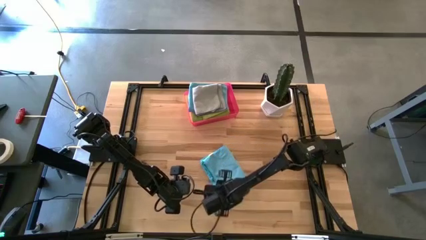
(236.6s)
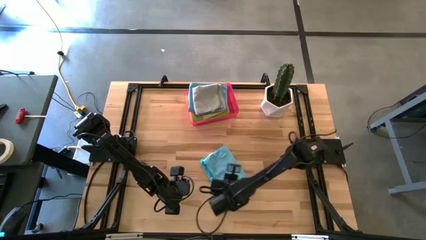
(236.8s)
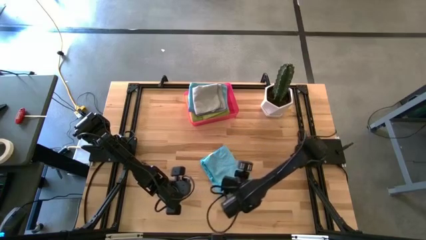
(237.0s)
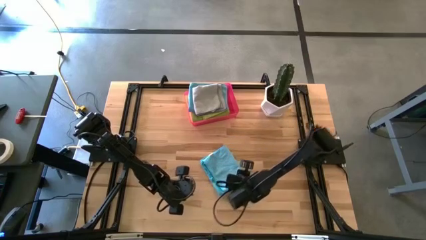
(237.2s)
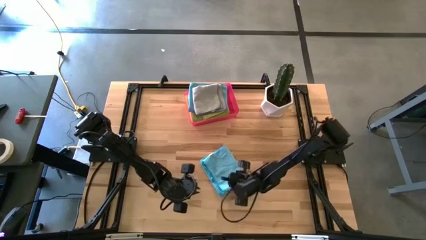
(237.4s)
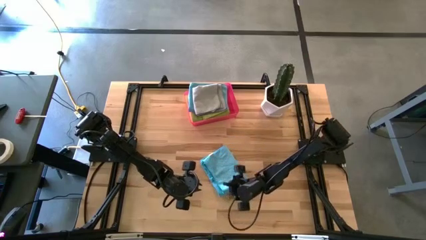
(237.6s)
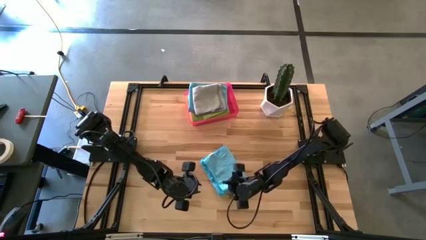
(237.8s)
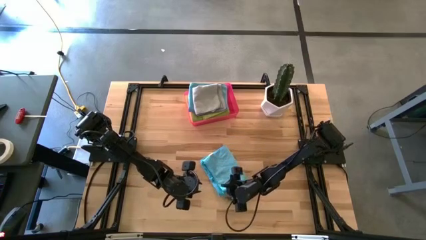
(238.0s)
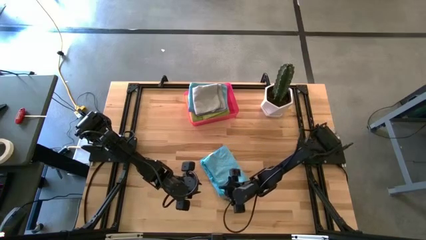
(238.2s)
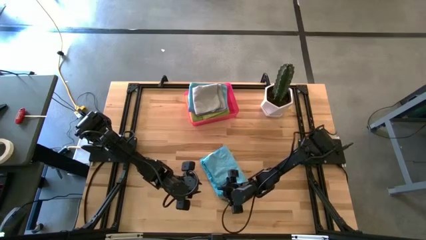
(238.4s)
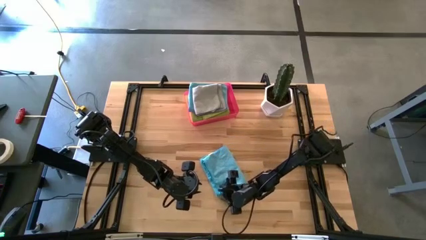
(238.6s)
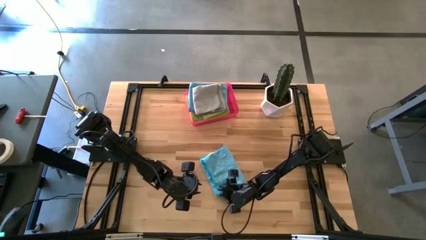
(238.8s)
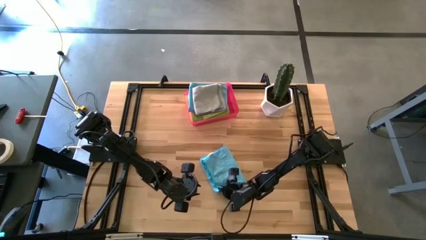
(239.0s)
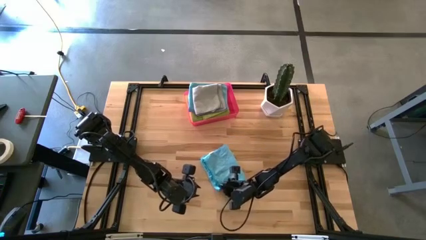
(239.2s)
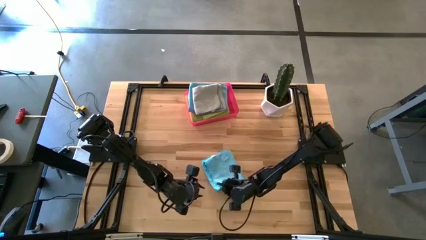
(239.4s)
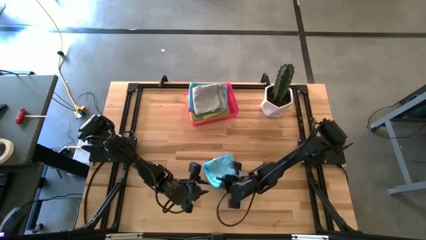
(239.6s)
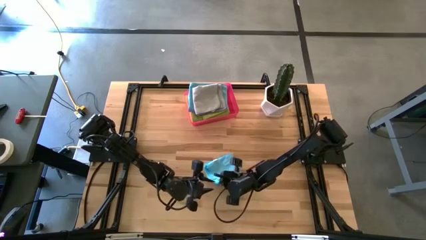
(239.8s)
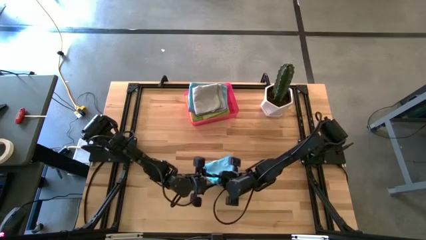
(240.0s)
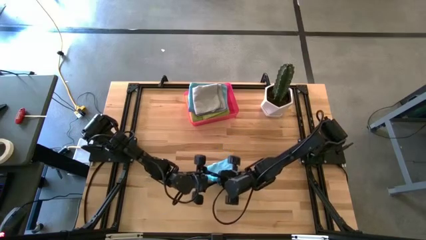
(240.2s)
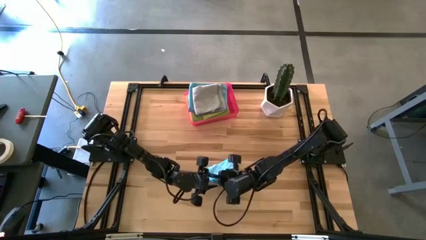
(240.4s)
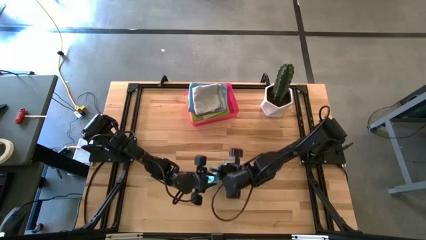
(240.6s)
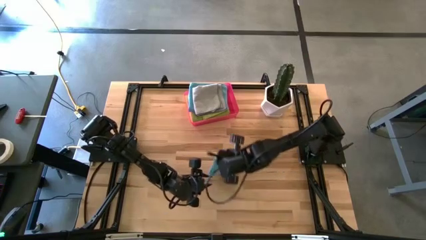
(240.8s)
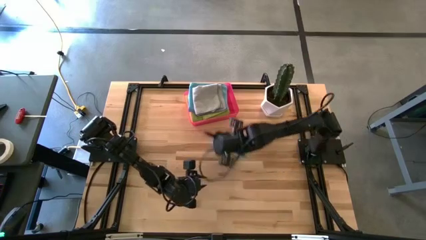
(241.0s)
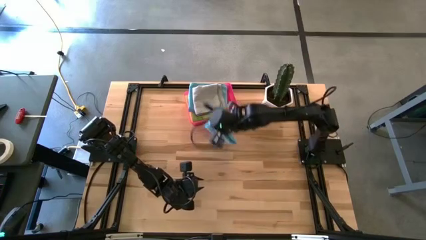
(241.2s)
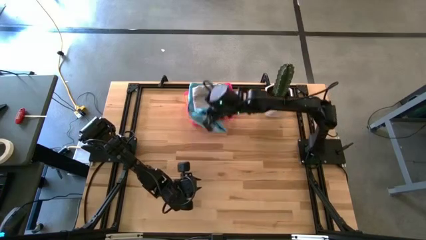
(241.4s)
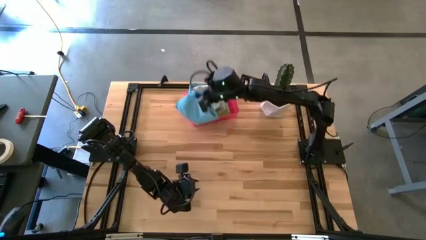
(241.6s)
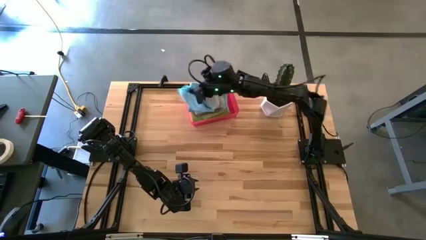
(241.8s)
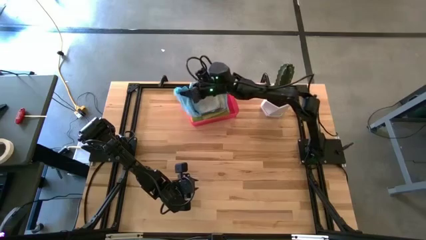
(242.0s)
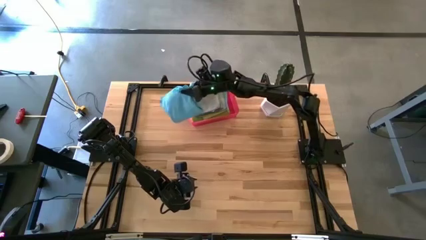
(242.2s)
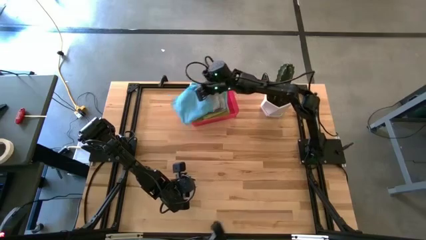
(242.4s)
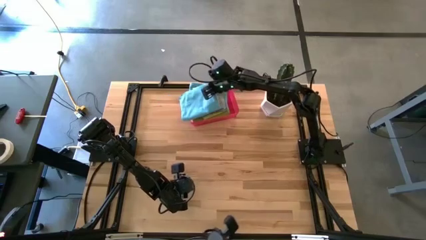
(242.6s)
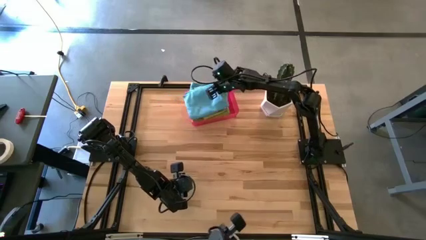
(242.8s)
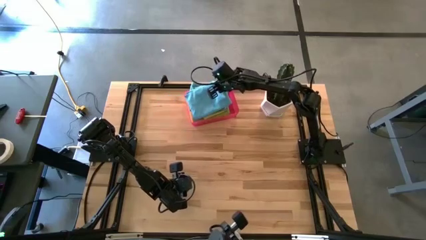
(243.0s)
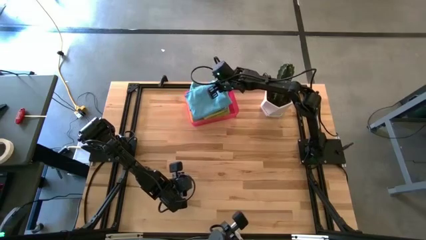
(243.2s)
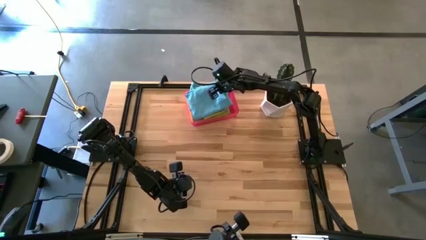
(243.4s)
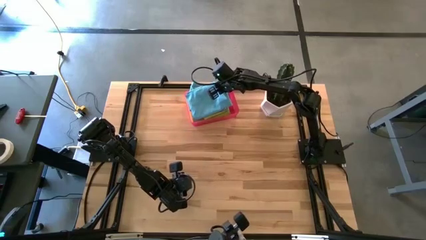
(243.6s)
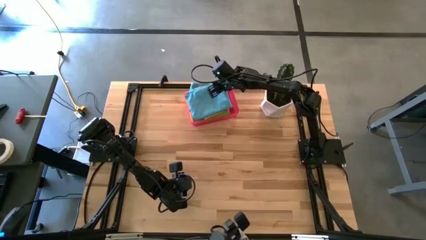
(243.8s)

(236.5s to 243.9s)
Task: Fold microfiber towels
Stack the folded blue microfiber cloth on top of the folded gray microfiber cloth

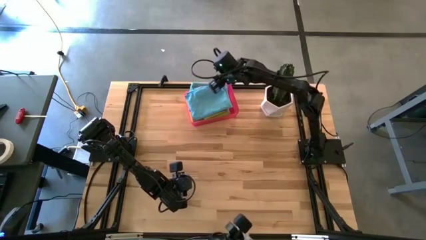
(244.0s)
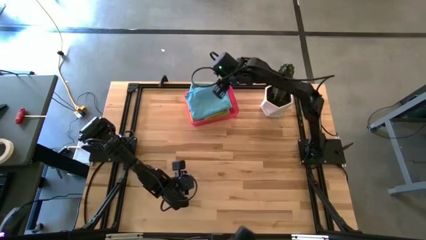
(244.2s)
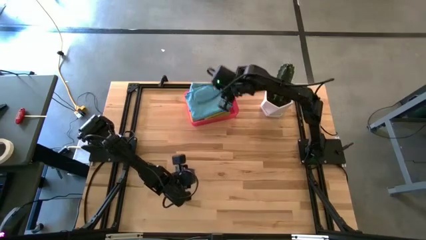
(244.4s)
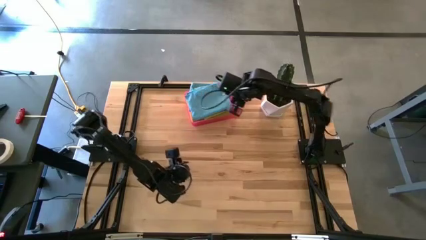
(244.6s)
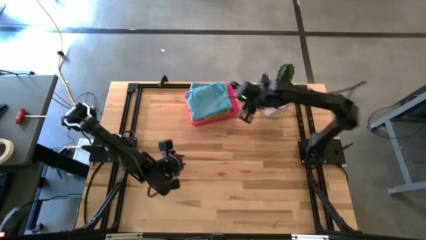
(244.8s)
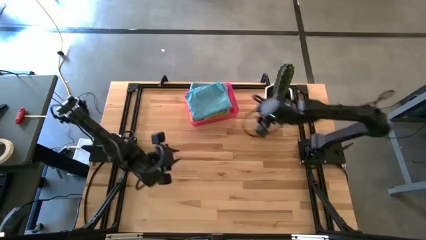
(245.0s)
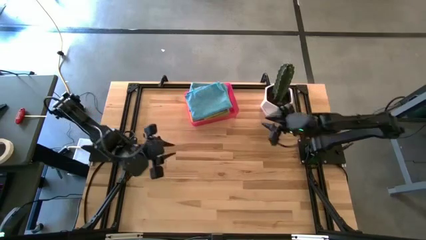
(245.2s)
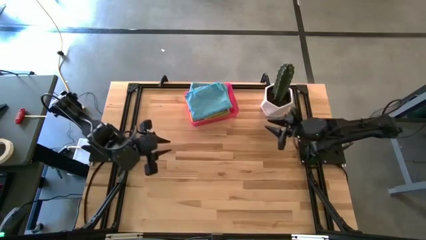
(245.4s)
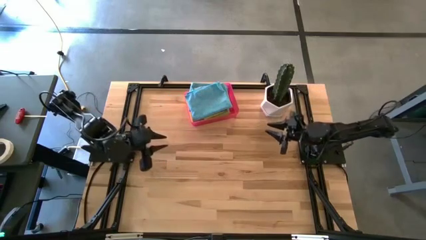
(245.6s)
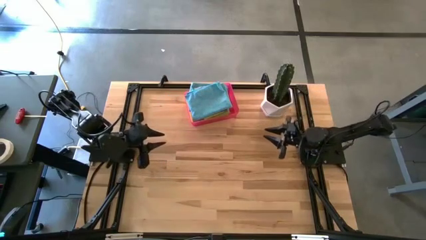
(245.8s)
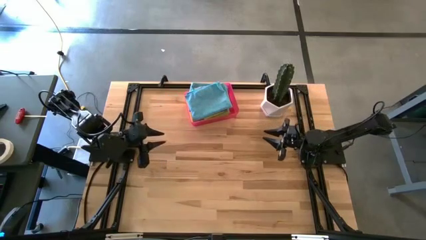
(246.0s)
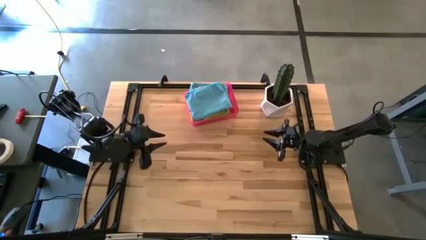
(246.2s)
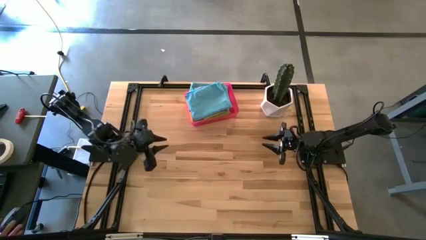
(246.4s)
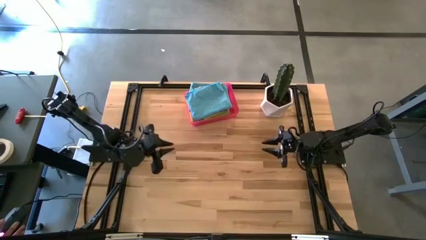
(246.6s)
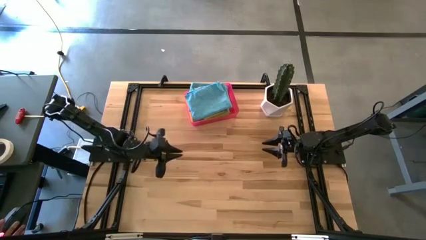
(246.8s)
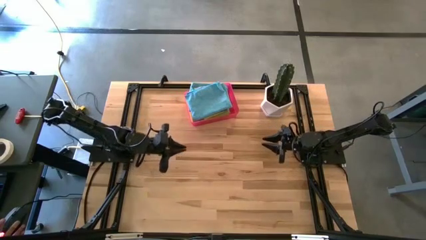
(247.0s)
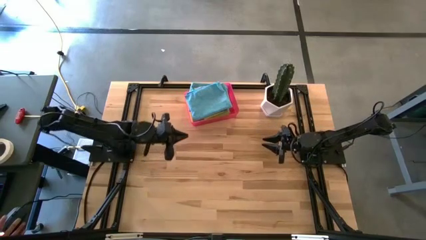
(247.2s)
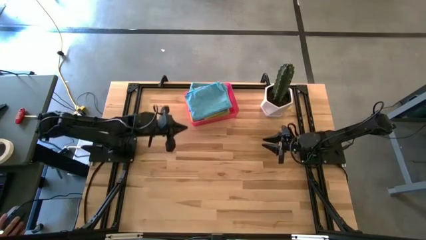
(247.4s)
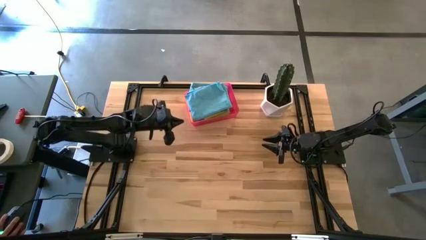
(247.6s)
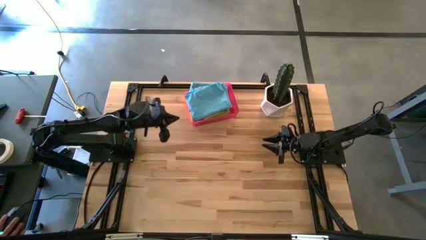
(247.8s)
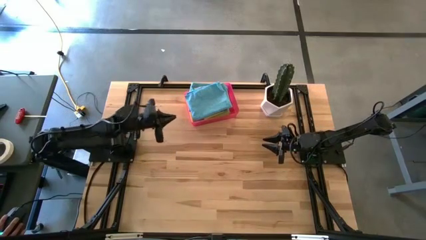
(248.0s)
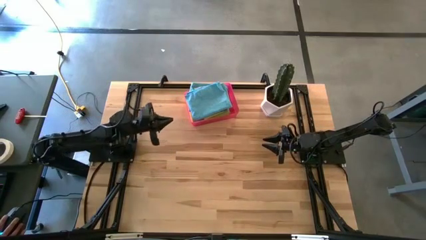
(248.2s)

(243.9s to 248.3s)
Return to Home Position

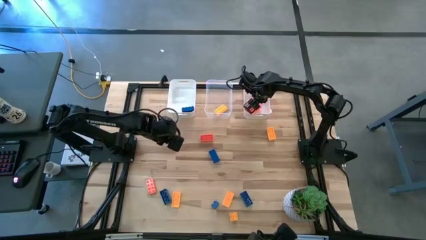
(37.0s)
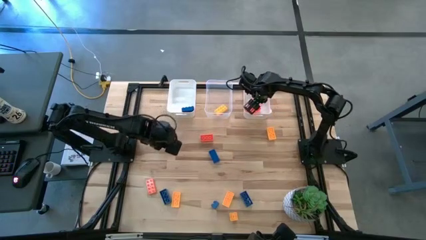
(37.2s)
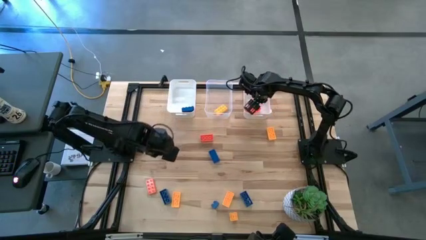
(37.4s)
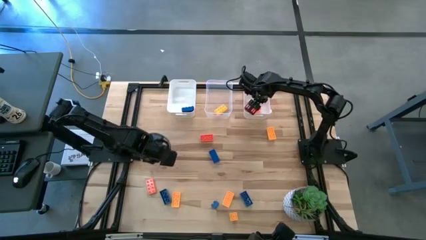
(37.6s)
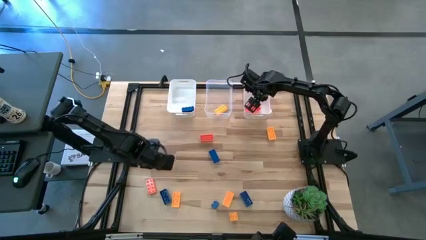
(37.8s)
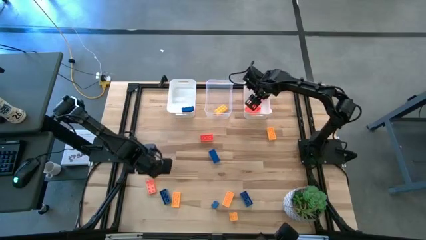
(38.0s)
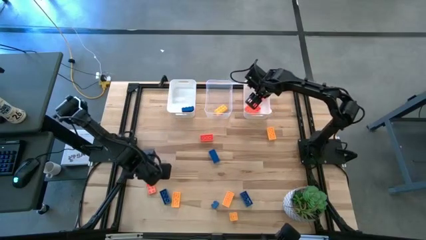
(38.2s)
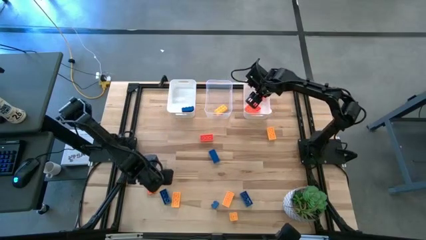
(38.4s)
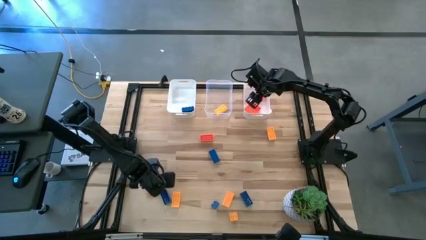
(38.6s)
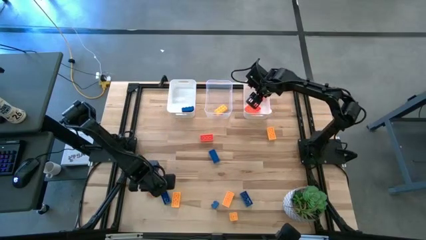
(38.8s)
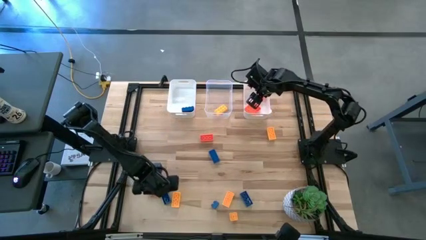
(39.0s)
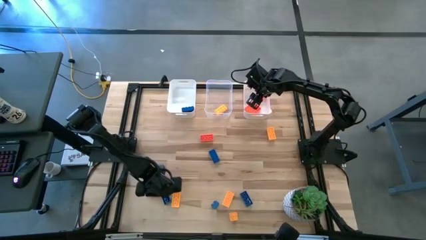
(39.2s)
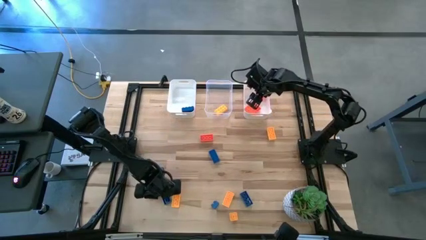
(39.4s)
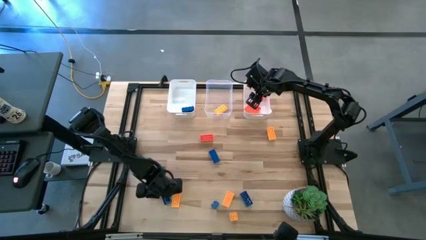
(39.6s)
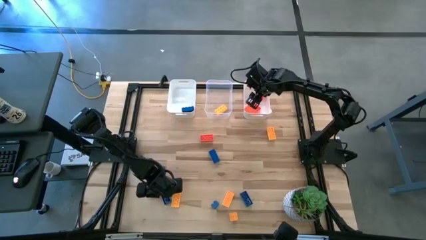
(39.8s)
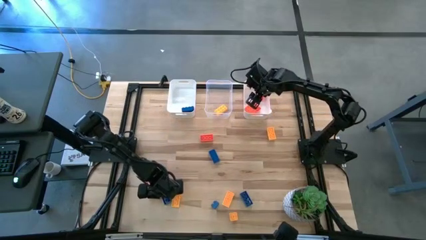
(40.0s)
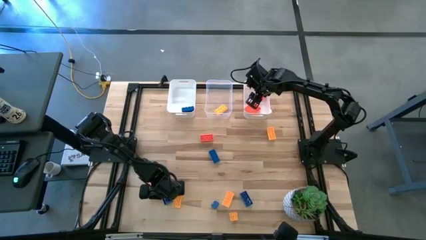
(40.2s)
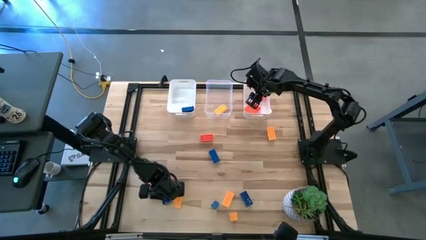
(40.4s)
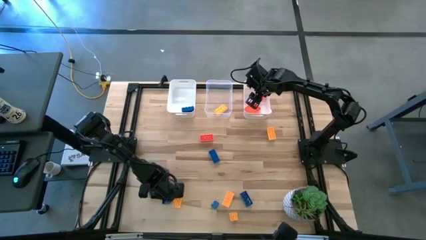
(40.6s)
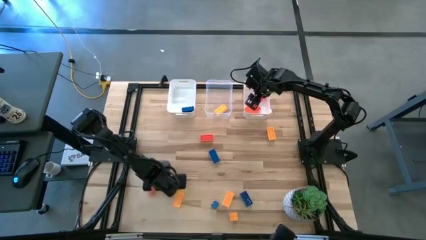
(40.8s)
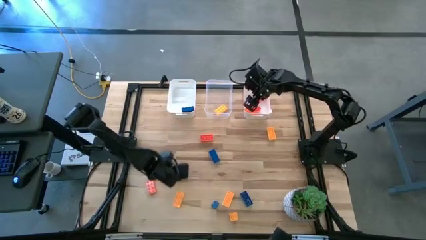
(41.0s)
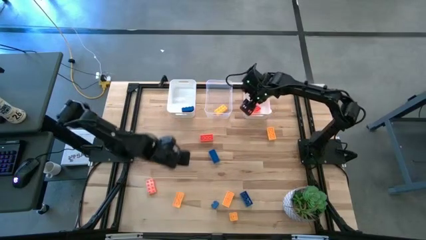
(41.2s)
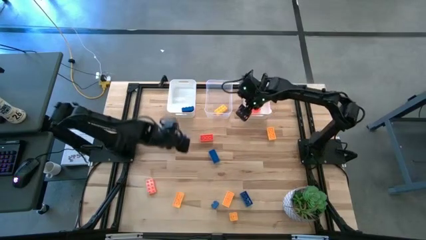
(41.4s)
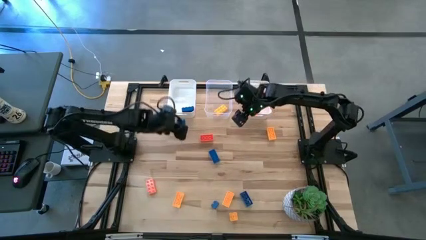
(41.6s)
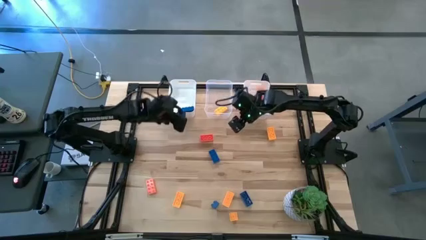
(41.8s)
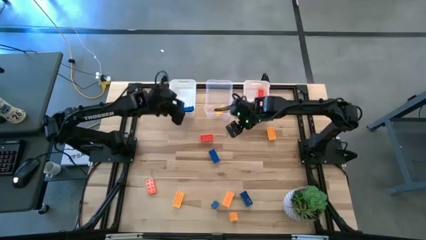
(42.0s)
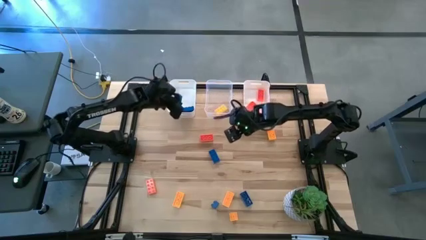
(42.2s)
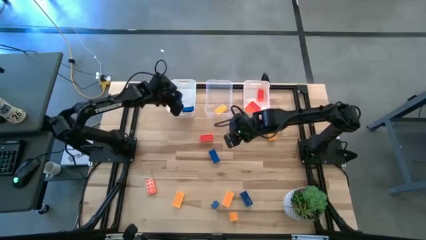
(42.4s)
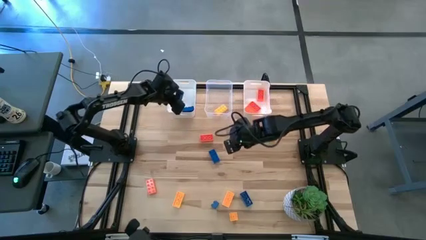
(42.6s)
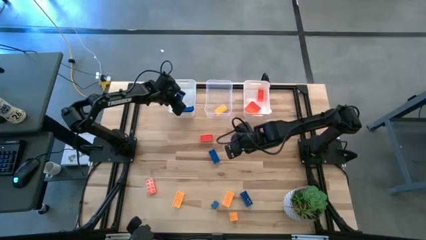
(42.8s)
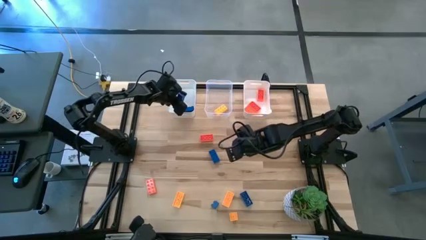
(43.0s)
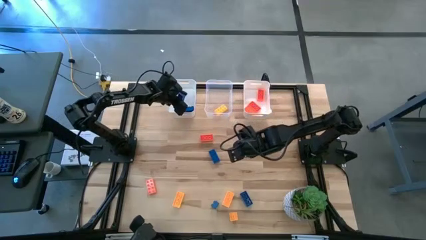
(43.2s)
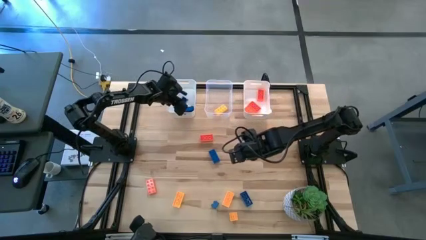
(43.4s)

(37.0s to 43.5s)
Task: Sort & place blocks by color
Put the blue game piece into the left white bin
